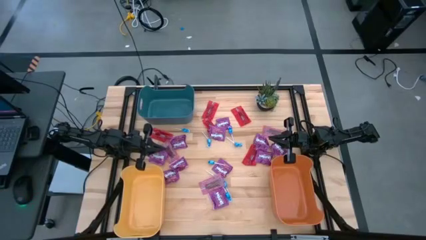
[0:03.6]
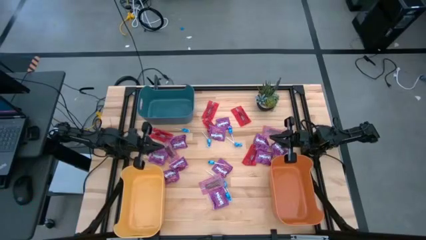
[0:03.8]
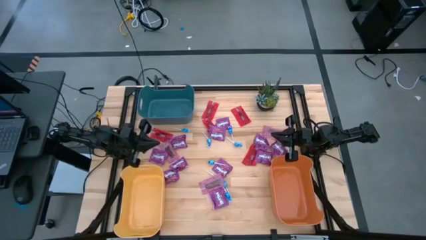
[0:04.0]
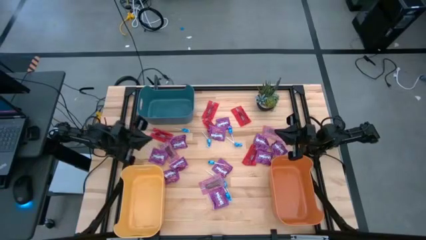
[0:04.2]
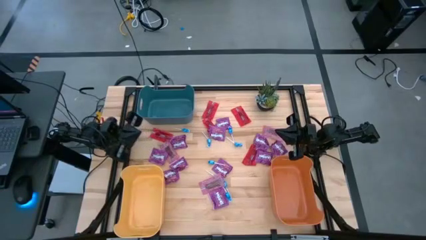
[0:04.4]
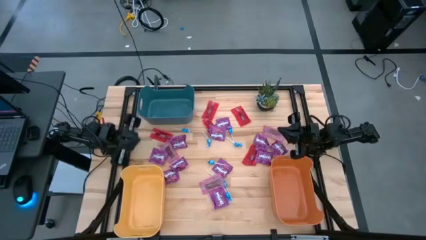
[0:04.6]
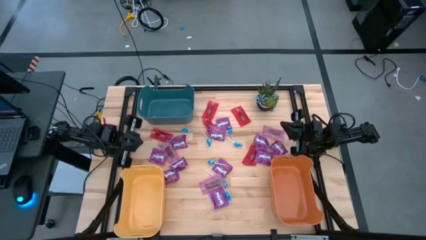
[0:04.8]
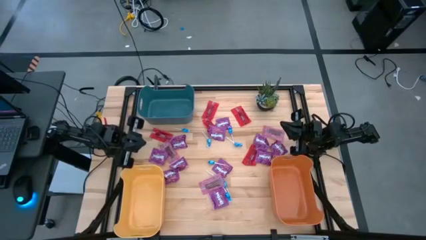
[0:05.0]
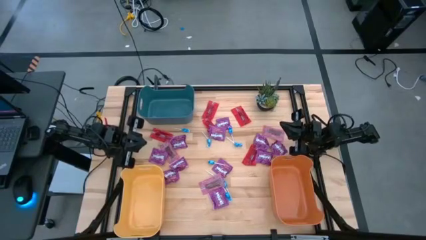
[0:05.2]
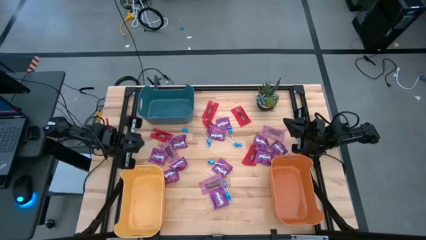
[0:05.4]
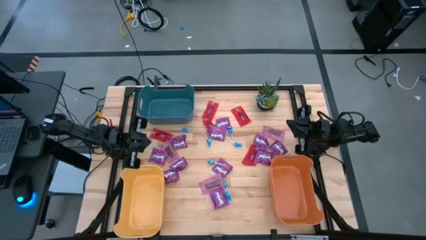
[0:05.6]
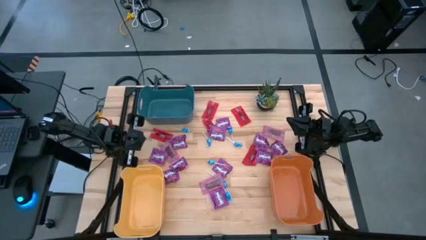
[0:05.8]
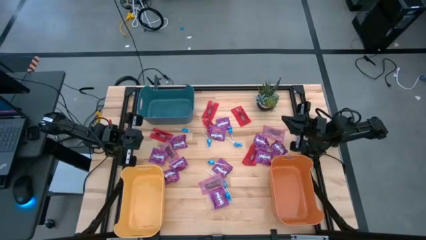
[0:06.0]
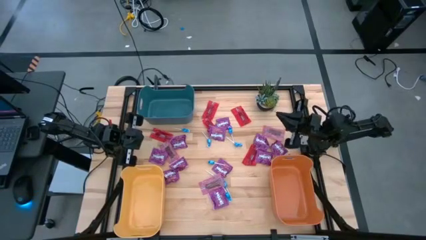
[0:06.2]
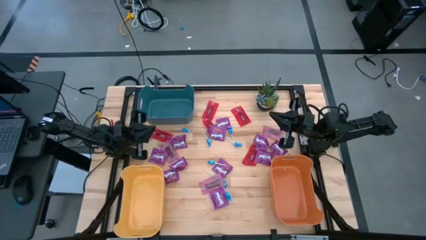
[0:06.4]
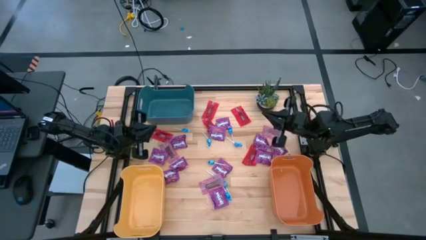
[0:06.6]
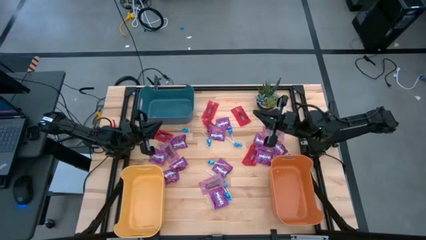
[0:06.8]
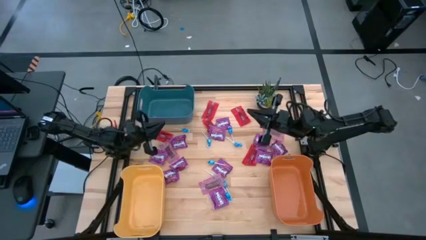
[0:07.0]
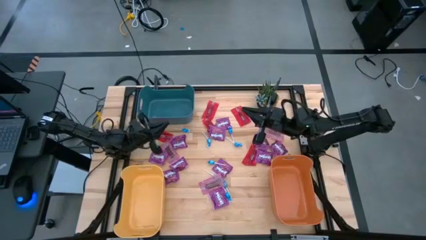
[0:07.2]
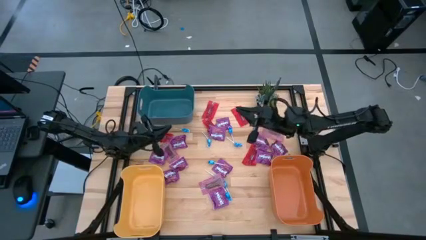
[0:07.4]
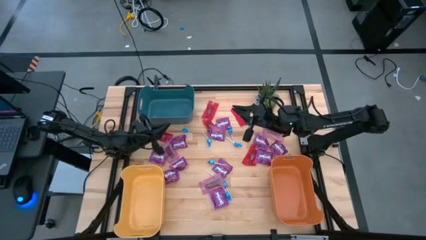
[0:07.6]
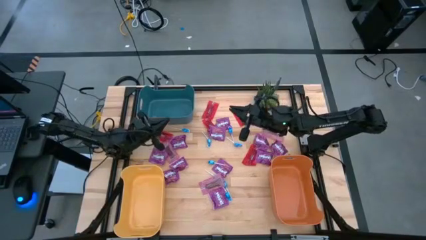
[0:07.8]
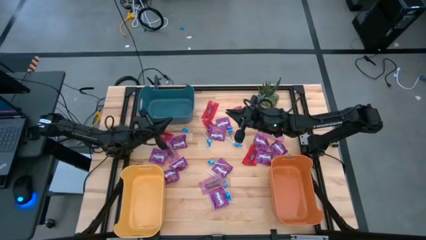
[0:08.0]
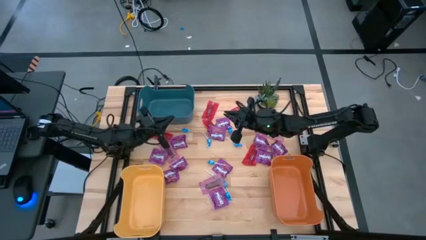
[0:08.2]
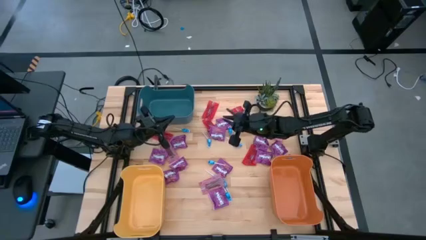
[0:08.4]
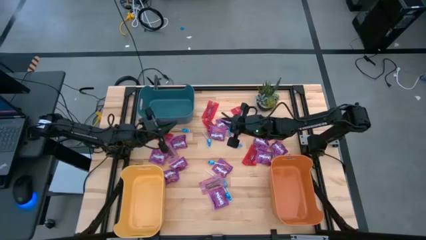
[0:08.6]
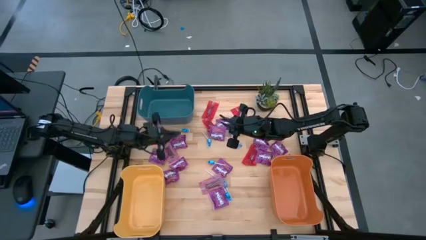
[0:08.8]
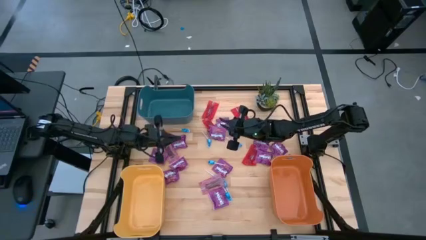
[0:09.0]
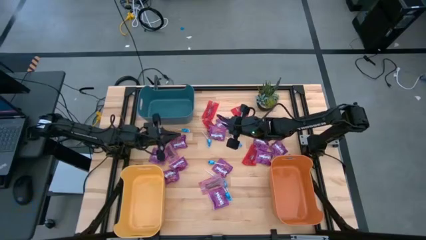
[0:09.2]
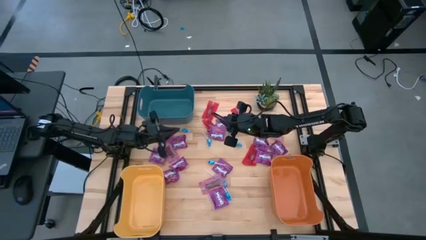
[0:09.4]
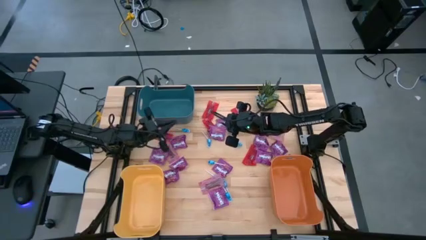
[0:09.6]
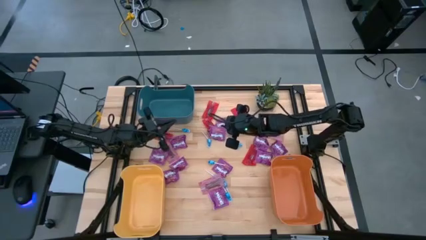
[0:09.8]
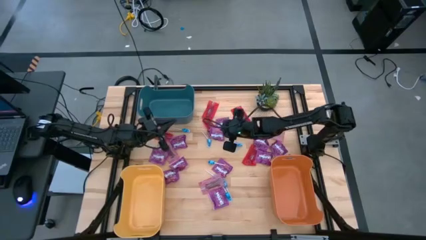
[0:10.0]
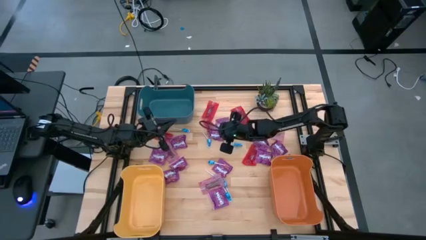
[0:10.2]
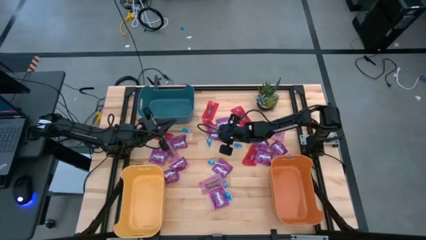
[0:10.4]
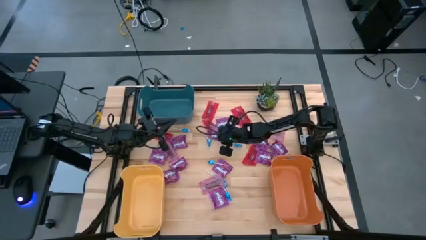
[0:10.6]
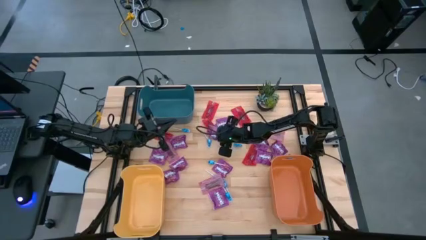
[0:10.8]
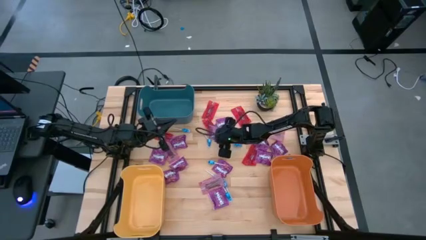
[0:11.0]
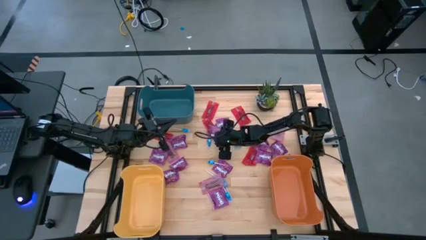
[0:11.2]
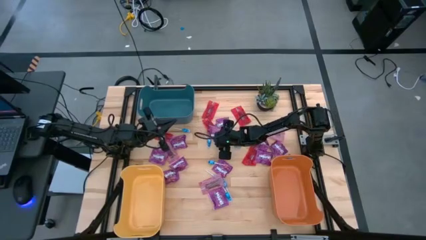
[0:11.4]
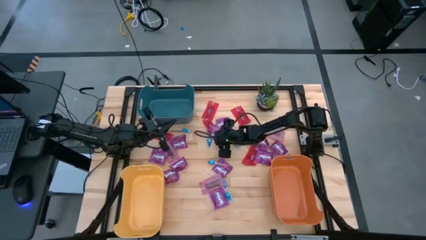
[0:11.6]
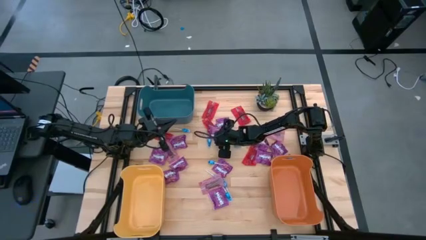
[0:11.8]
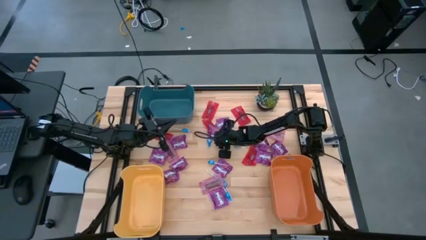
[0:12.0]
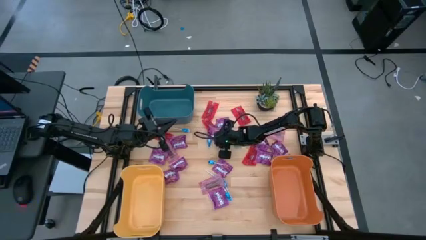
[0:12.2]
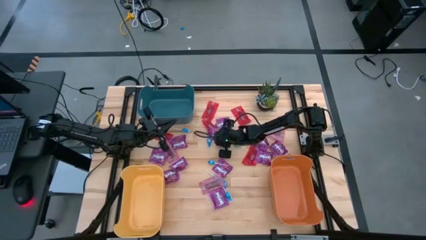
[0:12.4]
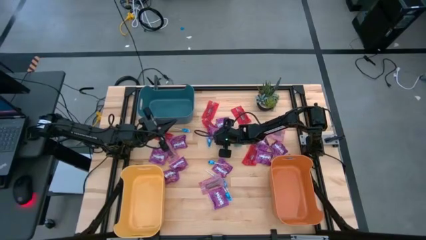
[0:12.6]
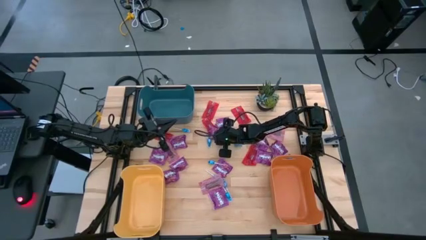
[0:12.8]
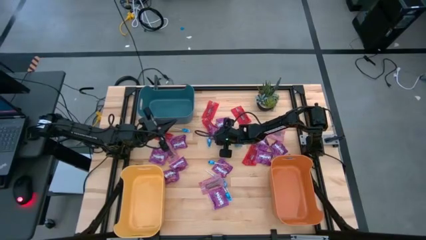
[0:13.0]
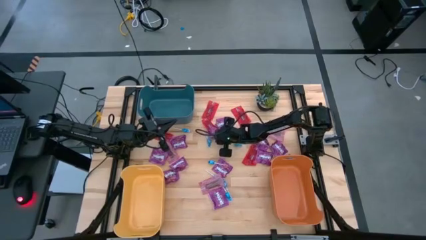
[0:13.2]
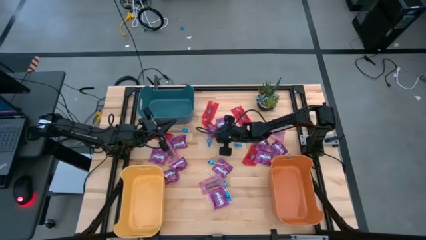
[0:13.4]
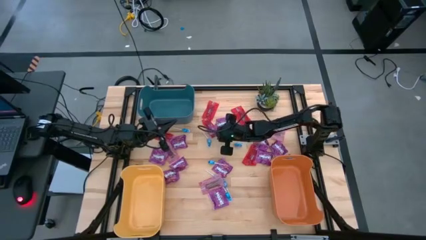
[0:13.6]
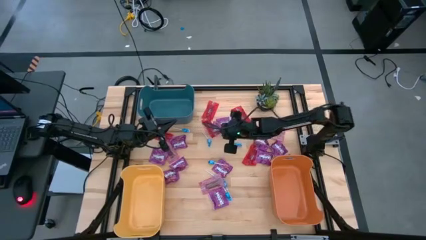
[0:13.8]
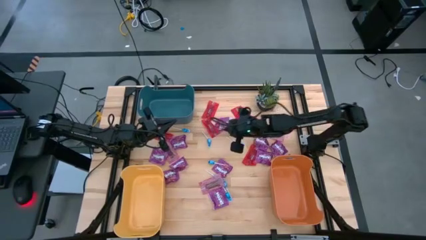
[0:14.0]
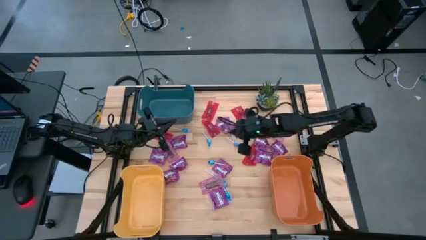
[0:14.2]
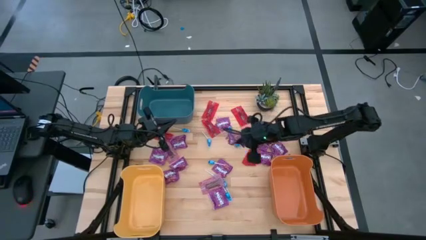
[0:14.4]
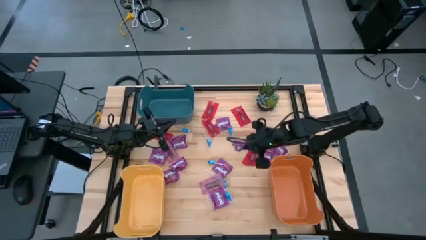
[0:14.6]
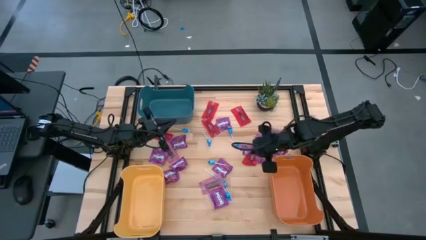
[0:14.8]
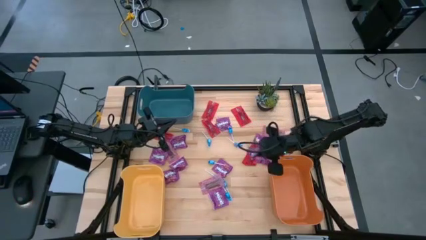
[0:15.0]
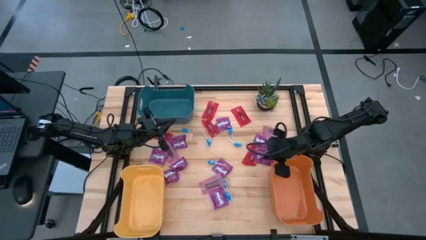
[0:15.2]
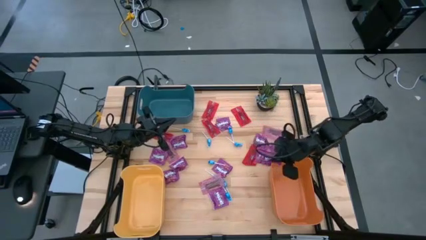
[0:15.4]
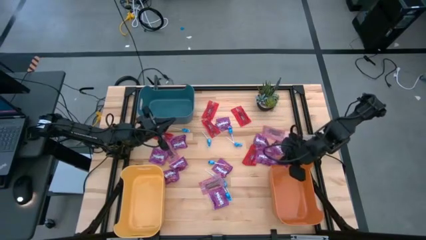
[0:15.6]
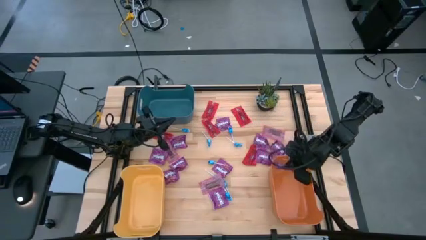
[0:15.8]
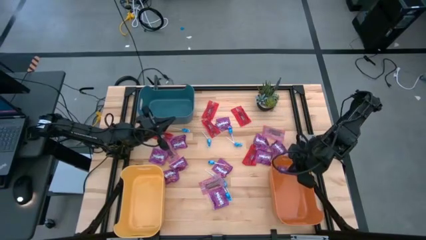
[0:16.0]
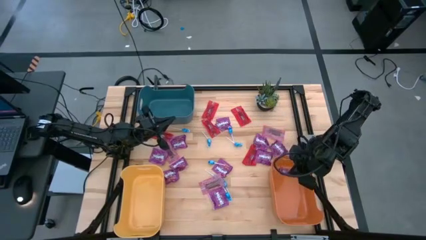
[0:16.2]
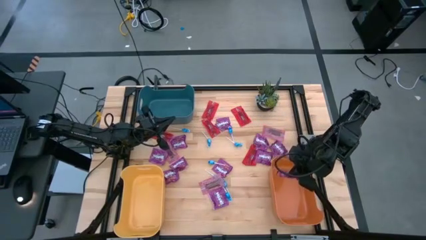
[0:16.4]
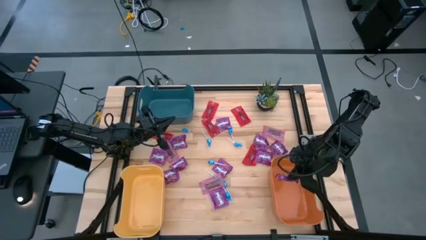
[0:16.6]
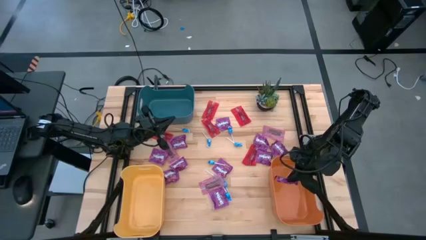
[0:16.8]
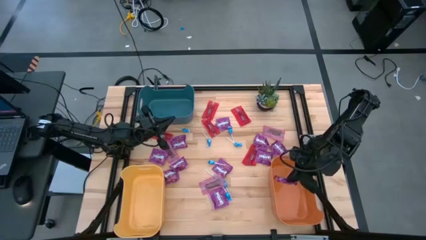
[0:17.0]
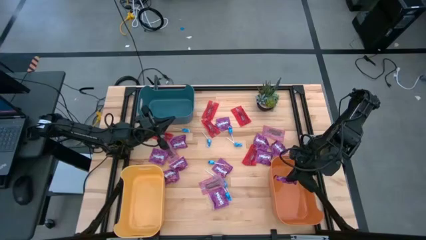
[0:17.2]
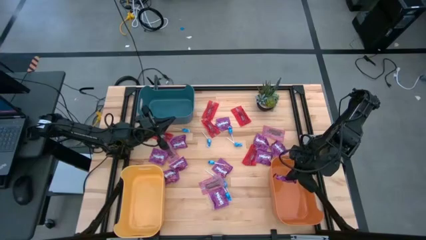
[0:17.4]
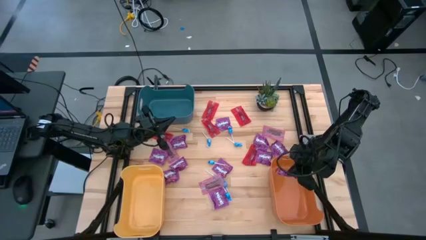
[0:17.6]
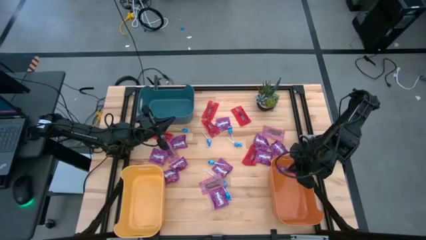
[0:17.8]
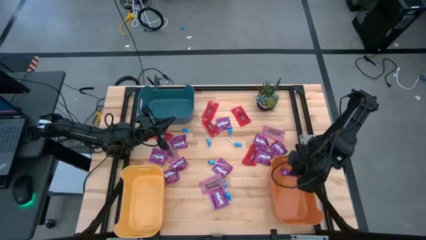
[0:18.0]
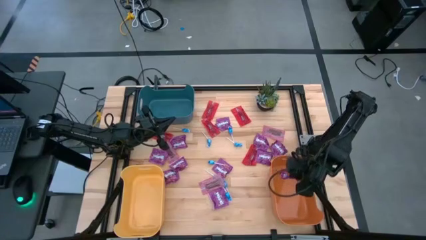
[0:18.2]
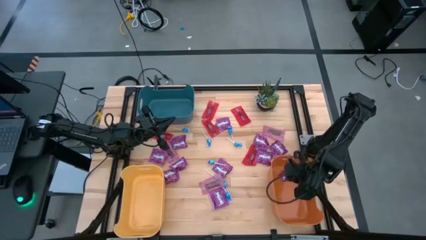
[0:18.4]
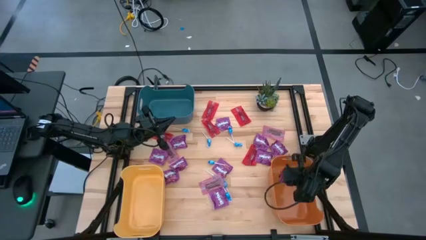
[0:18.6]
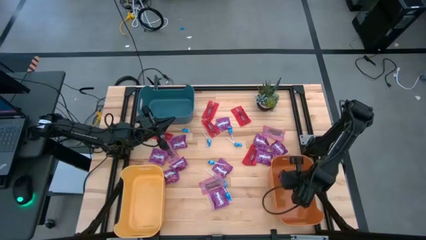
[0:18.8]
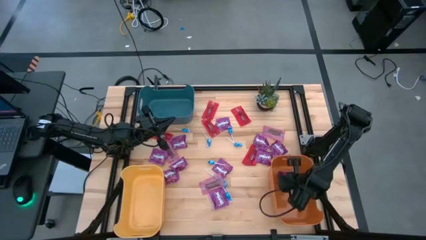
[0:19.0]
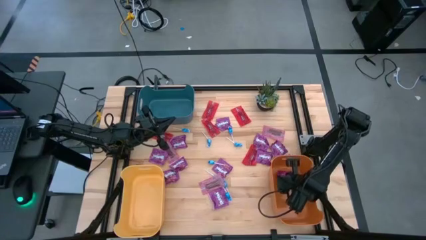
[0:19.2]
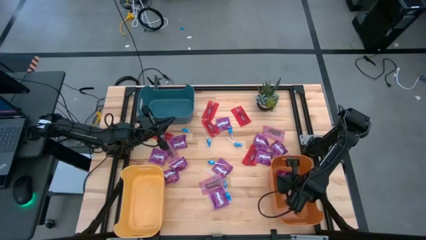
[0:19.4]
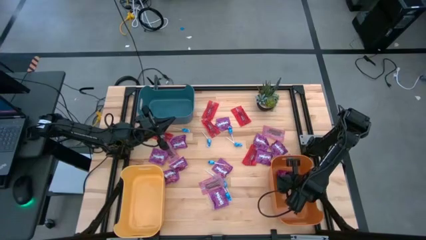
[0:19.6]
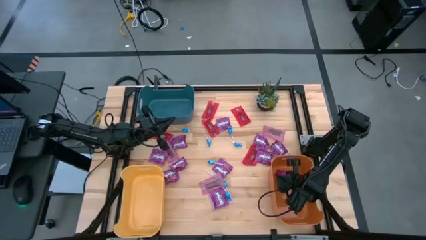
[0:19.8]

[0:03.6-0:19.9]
Task: Sort candy
Put the purple candy into the orange bin
